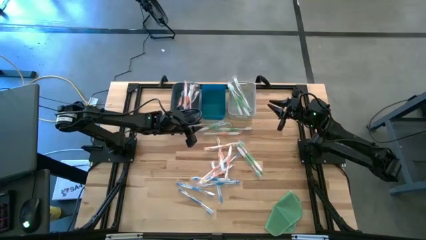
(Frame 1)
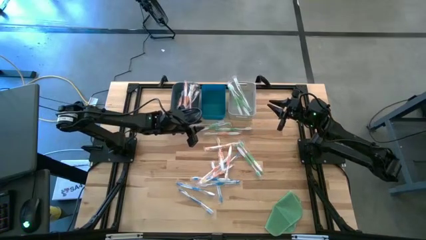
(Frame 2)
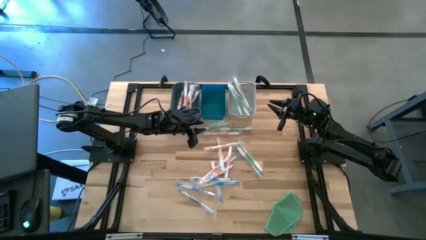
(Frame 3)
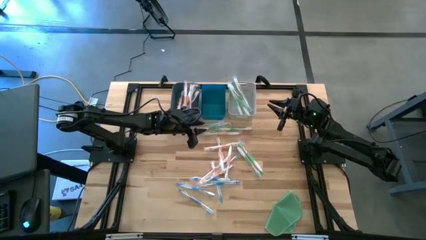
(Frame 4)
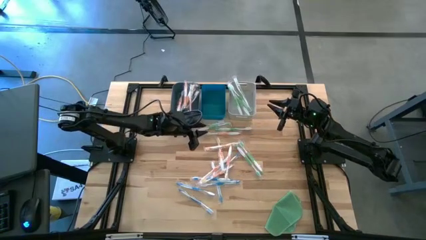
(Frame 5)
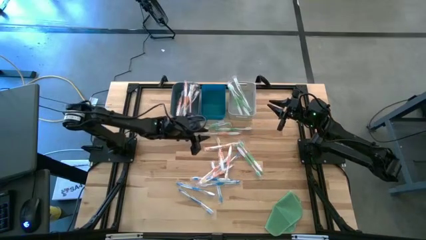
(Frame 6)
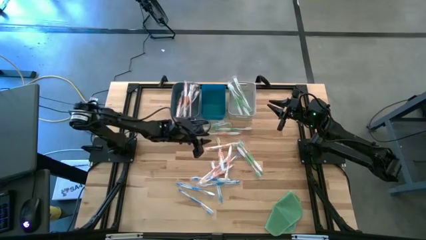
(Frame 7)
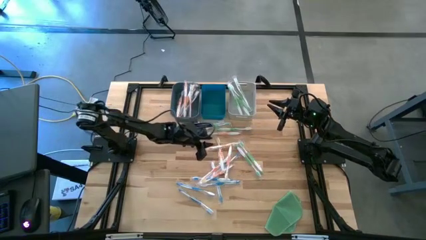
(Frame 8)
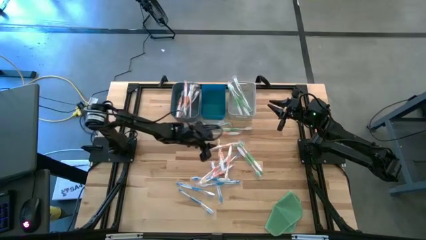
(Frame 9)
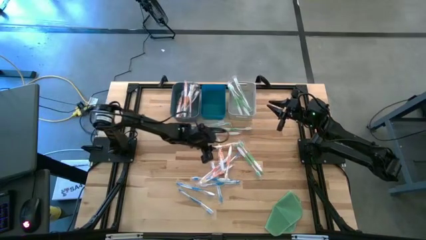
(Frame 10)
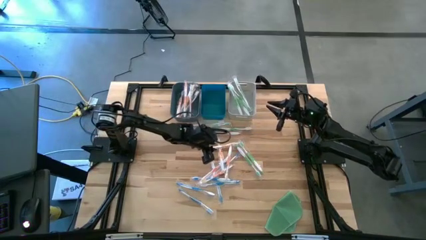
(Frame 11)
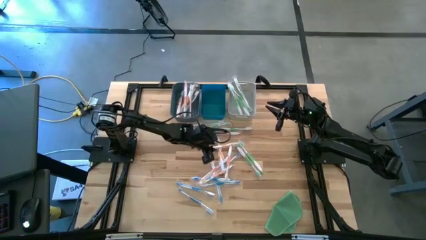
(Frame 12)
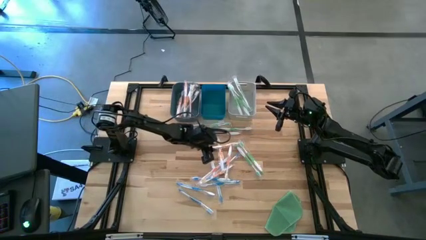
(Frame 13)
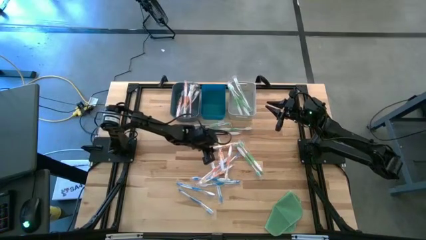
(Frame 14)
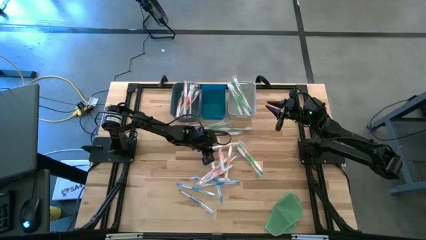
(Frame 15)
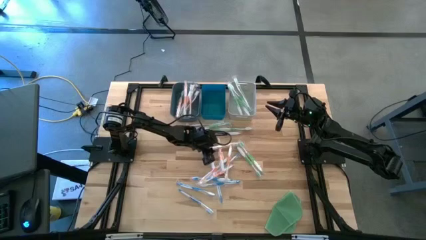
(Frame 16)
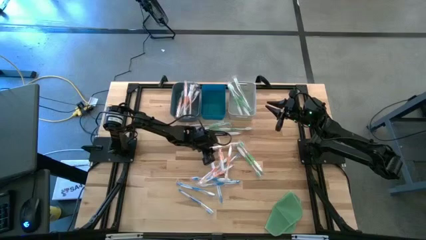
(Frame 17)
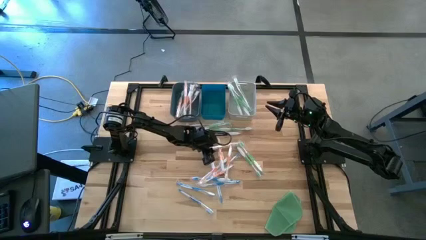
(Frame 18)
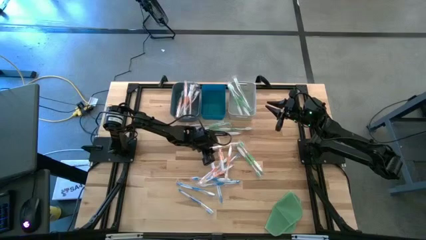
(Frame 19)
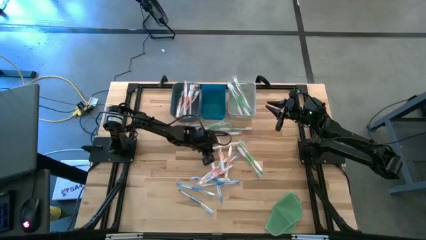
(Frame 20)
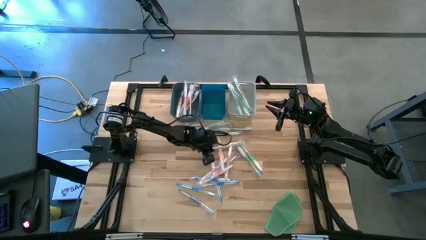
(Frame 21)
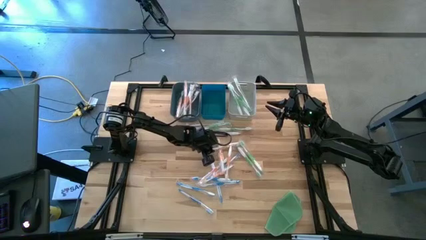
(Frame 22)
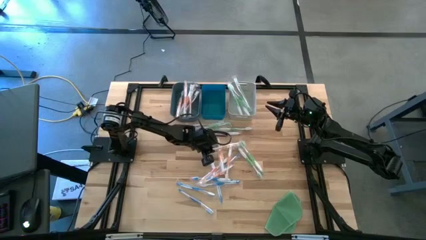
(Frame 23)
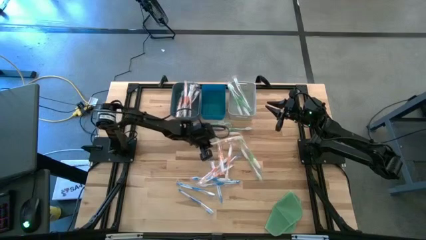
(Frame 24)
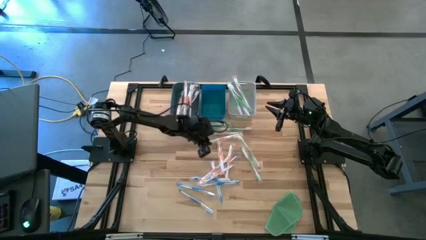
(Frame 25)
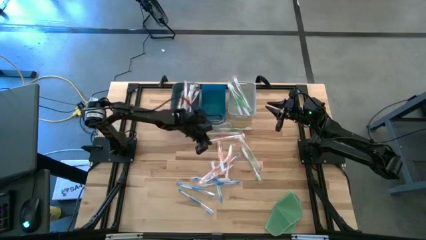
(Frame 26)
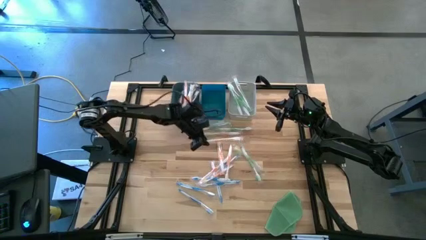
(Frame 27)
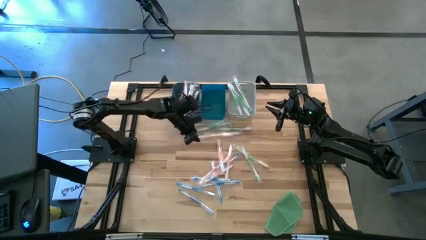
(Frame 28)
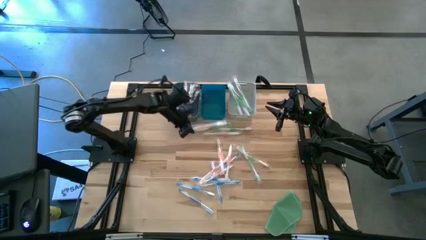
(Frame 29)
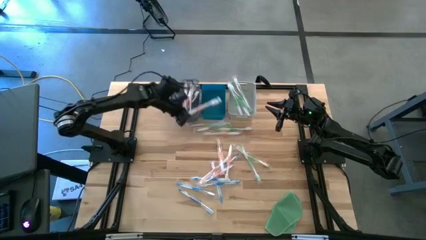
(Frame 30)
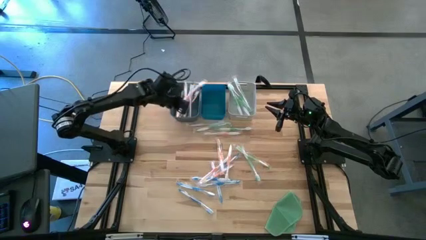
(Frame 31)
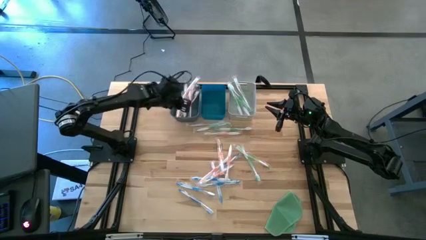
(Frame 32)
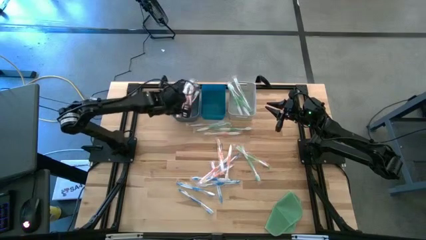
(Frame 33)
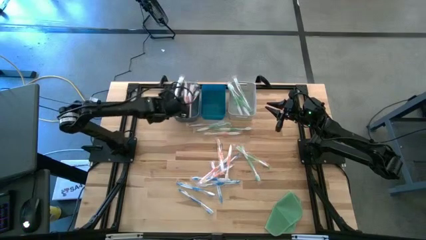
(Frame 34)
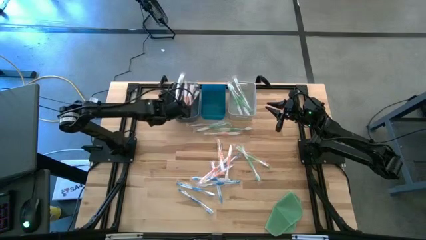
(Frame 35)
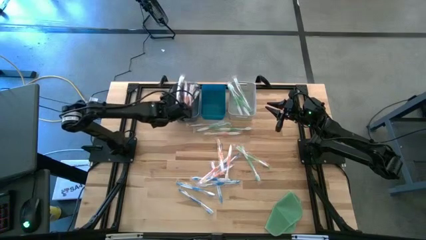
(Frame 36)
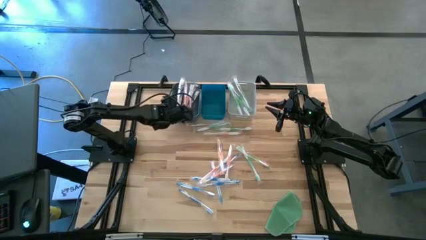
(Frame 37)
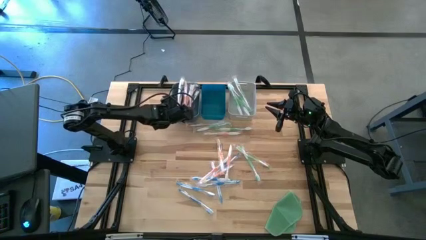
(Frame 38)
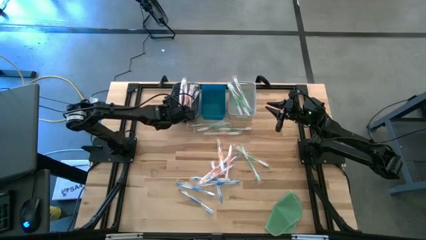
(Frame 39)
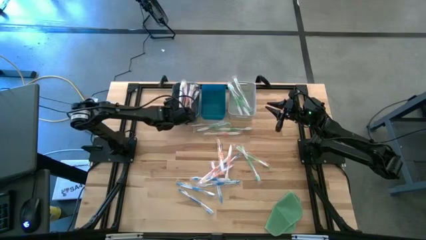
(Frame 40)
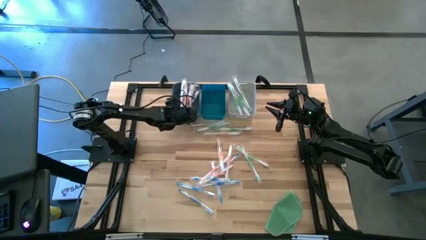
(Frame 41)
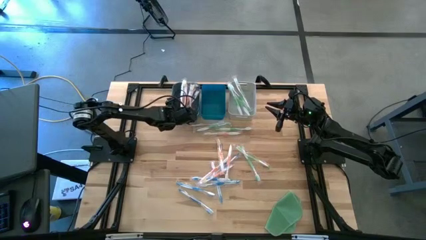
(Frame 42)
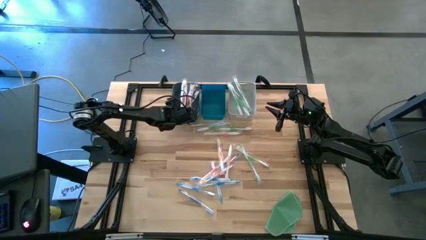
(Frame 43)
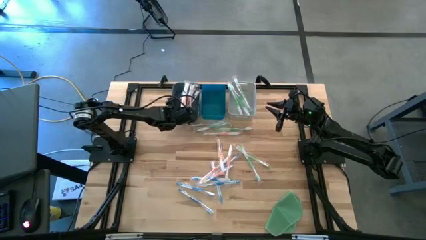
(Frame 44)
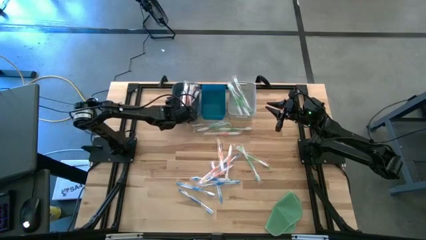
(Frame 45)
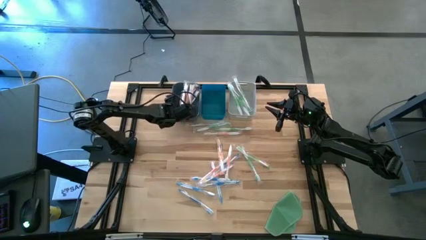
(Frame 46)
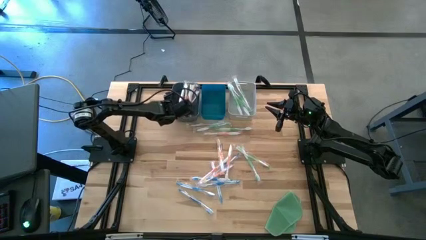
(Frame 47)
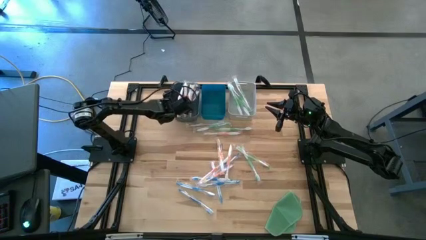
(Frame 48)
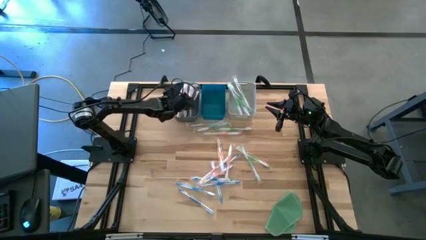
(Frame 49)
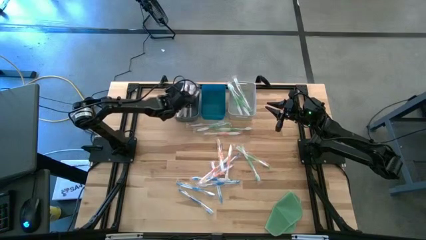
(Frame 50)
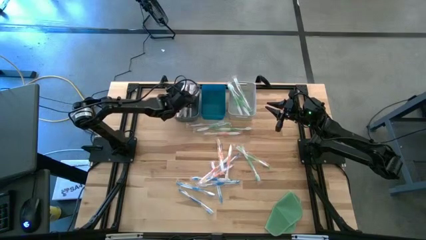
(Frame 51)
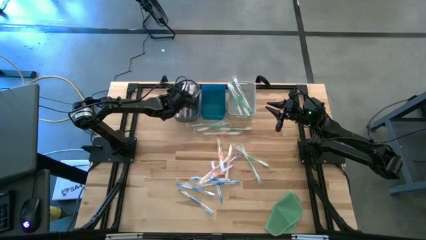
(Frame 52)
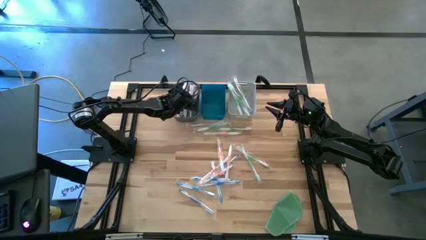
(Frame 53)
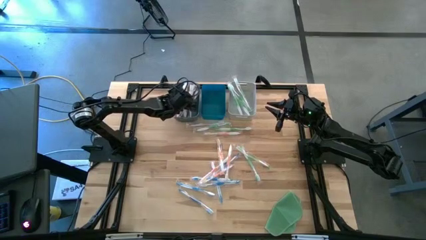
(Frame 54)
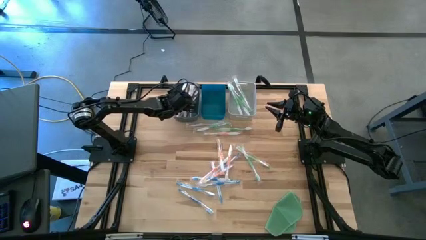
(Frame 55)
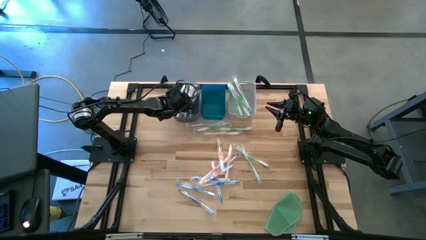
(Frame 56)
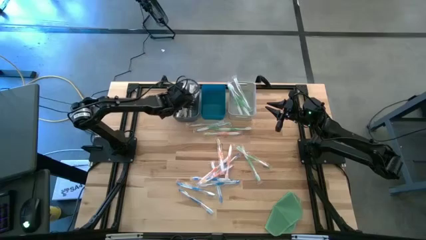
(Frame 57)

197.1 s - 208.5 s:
Task: Pick & Place Toothbrushes
Put the orange toothbrush into the dark blue bin

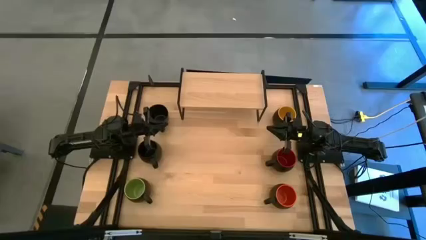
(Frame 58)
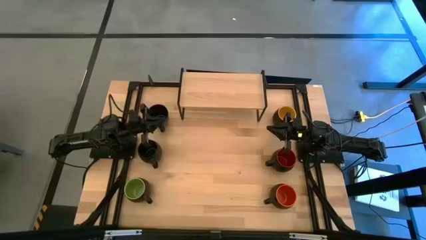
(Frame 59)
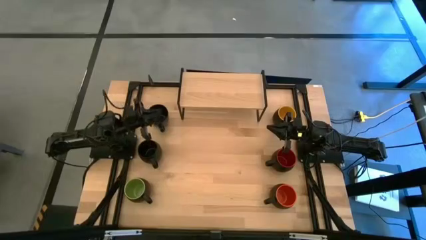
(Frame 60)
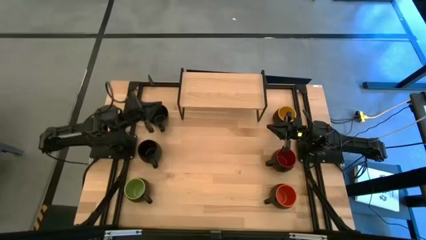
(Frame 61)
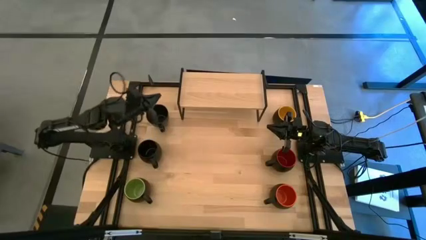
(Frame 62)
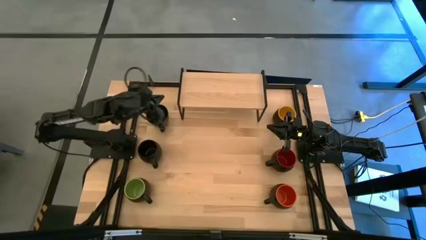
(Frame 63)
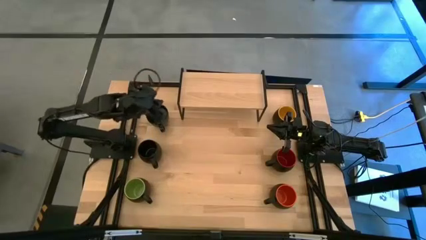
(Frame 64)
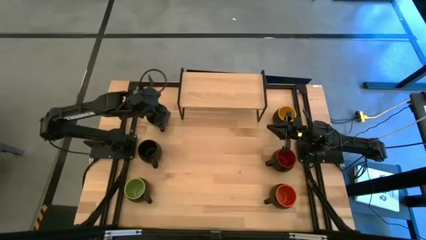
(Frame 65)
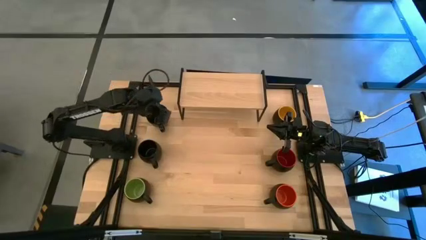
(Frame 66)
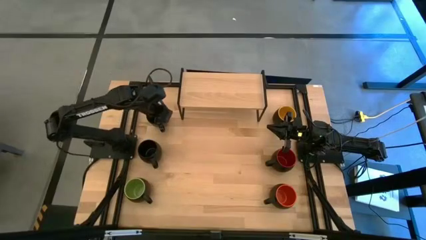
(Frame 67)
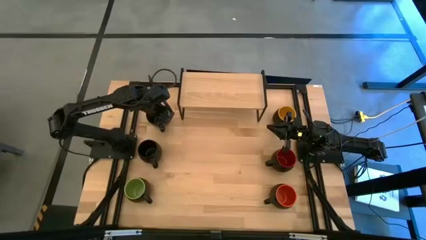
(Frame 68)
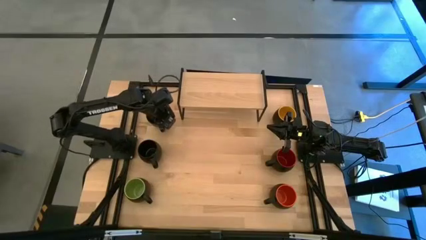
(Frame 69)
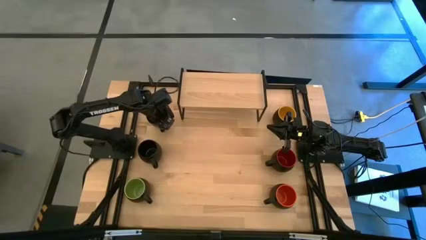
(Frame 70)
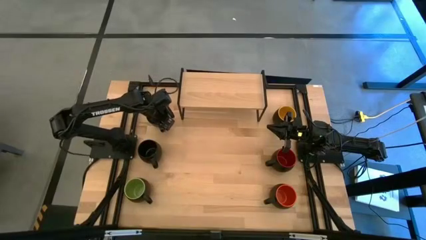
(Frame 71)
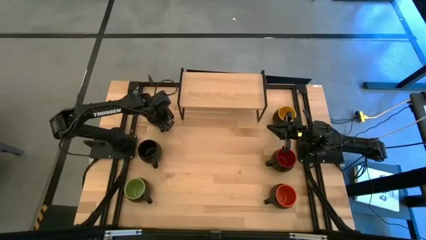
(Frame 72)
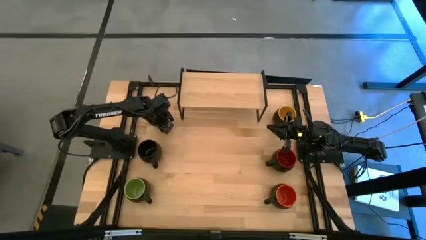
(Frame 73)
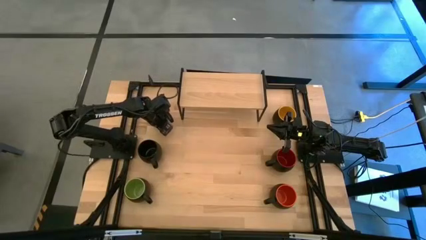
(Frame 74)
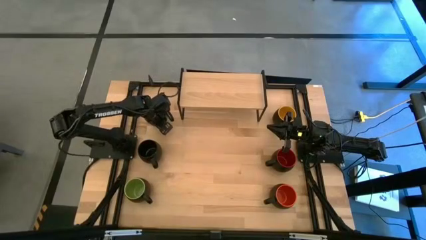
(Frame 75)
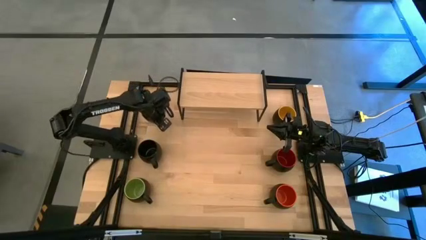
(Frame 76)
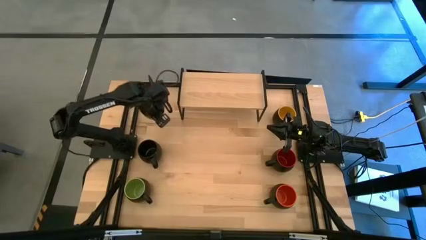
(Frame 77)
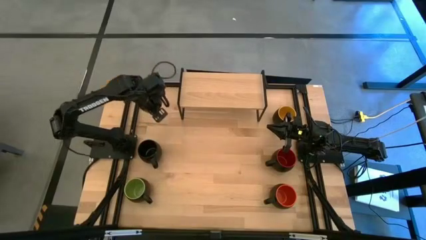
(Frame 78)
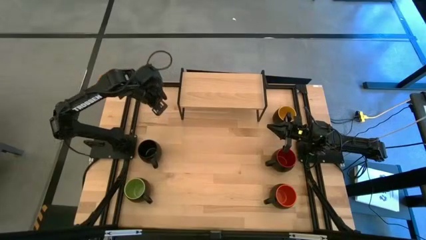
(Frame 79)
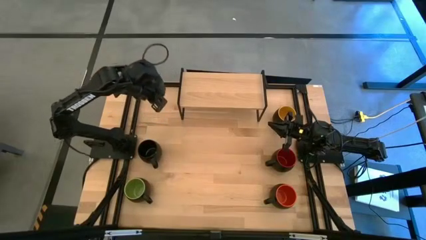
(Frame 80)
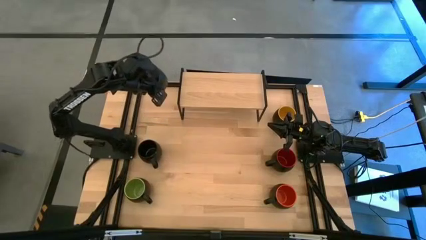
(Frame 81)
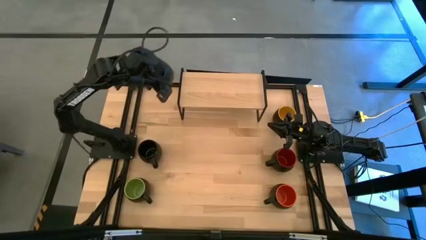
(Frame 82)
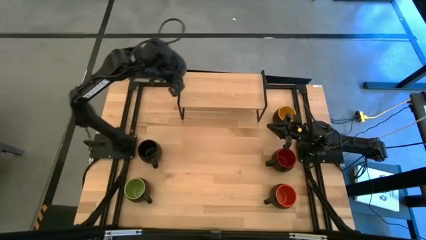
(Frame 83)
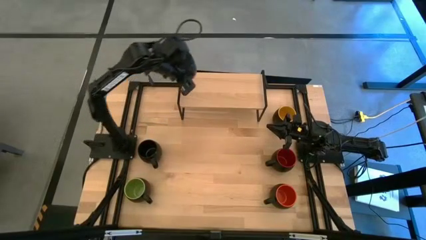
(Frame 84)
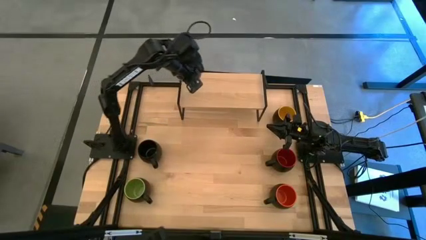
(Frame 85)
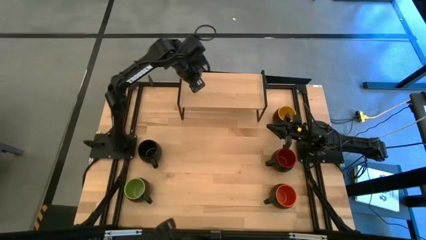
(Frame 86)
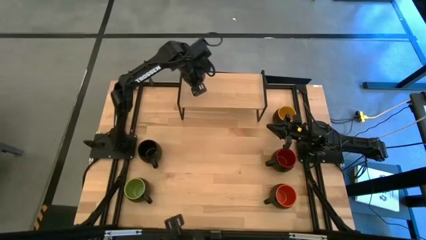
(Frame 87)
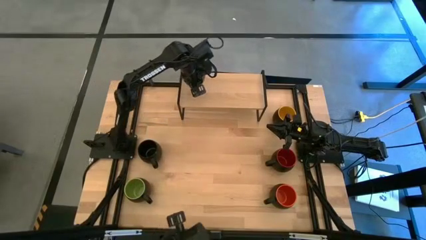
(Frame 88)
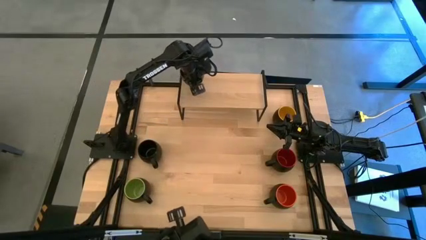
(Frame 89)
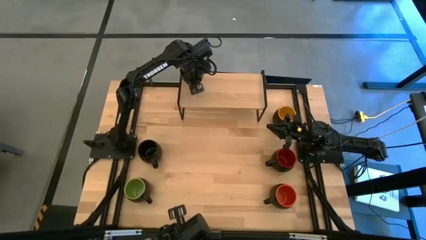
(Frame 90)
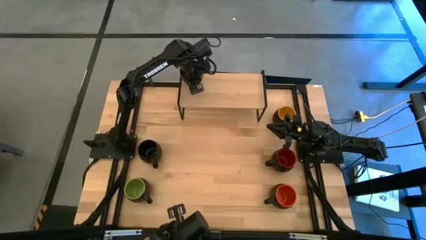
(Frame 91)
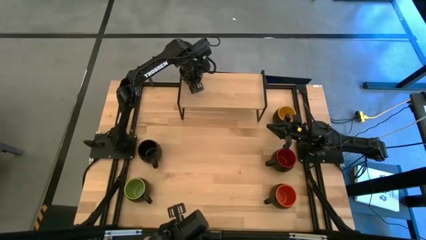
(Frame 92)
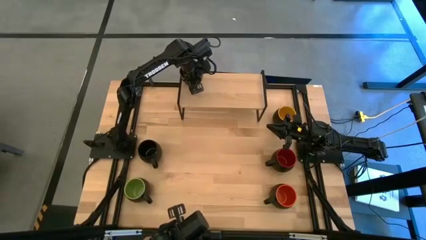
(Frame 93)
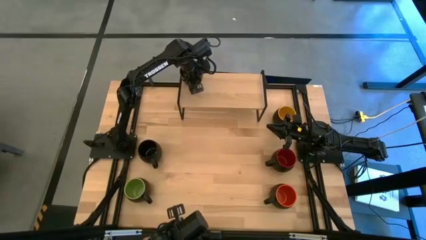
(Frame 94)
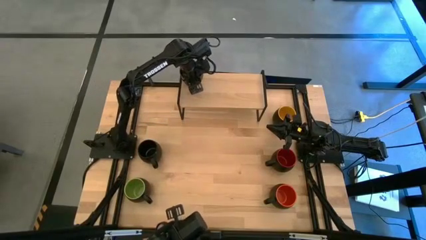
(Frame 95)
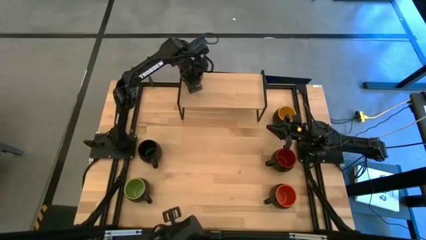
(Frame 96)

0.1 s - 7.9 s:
Task: Place coffee mugs
Put the top black mug on the shelf
